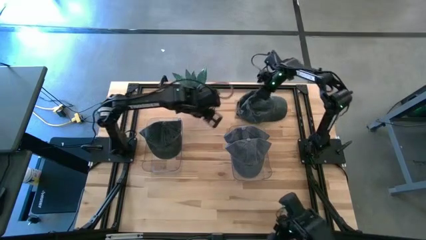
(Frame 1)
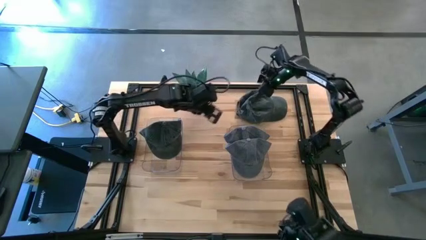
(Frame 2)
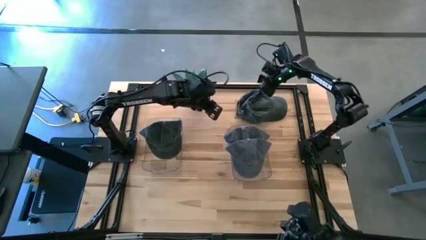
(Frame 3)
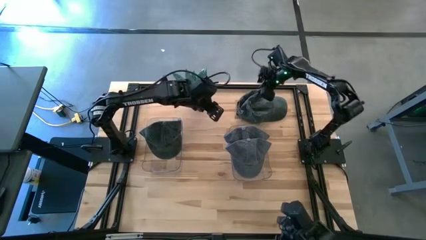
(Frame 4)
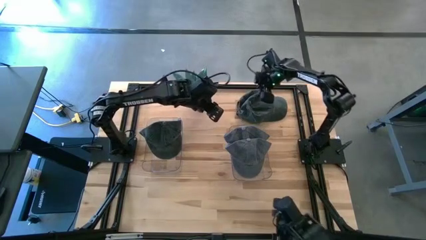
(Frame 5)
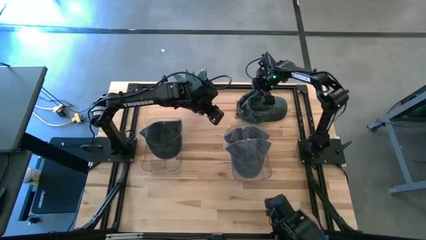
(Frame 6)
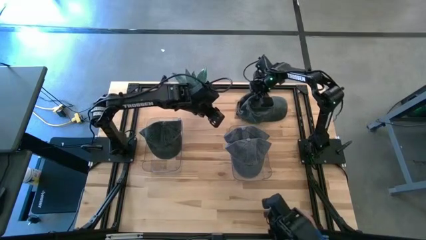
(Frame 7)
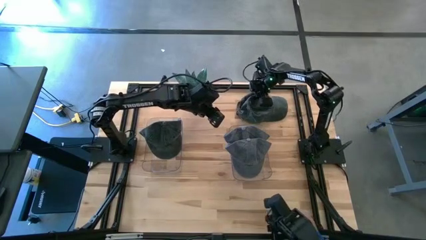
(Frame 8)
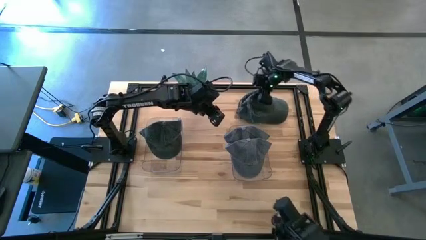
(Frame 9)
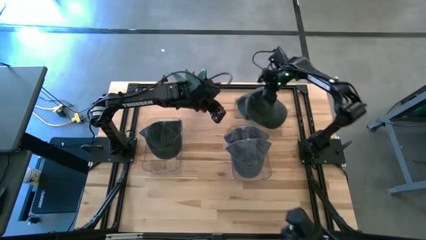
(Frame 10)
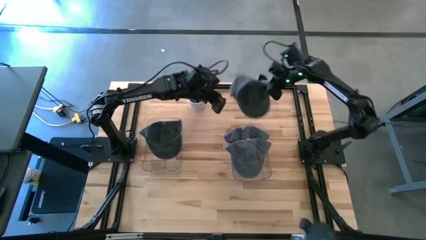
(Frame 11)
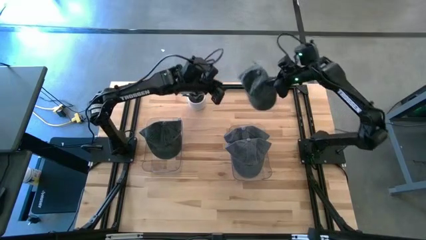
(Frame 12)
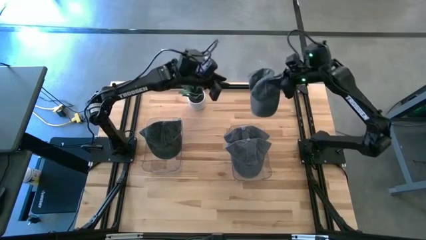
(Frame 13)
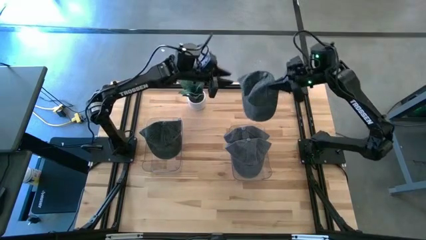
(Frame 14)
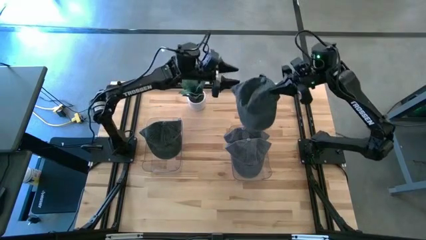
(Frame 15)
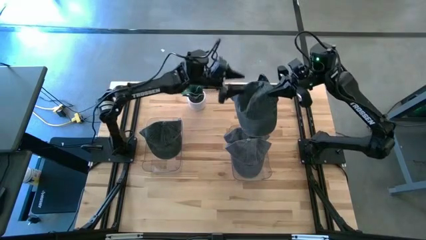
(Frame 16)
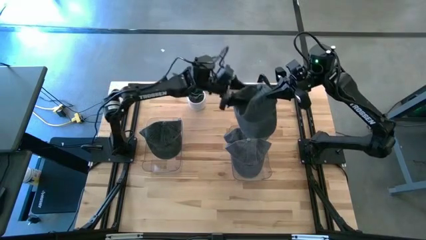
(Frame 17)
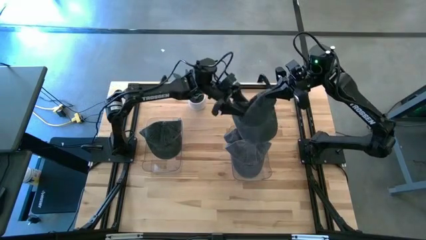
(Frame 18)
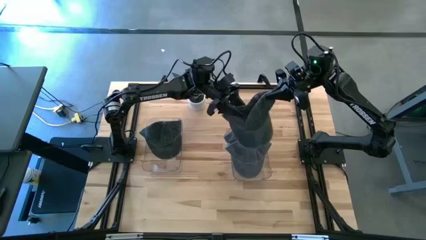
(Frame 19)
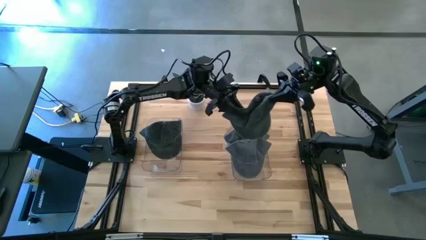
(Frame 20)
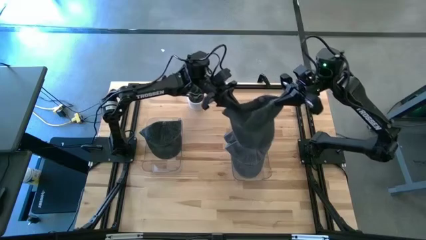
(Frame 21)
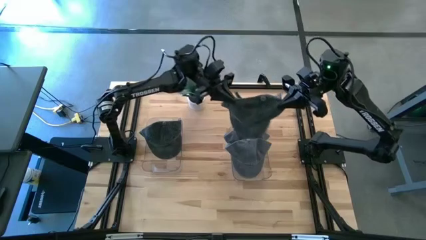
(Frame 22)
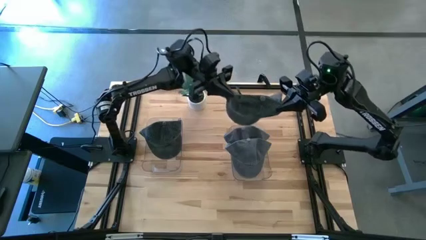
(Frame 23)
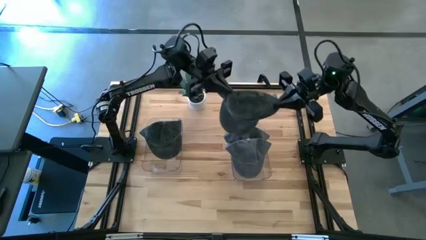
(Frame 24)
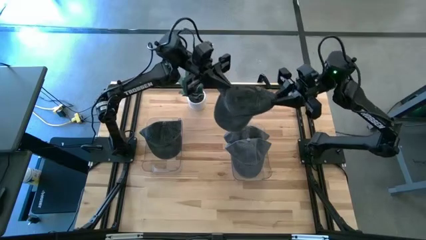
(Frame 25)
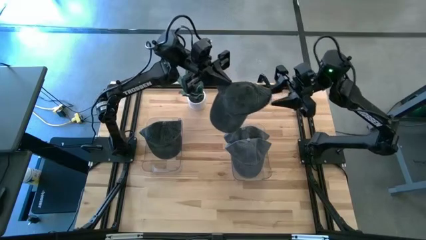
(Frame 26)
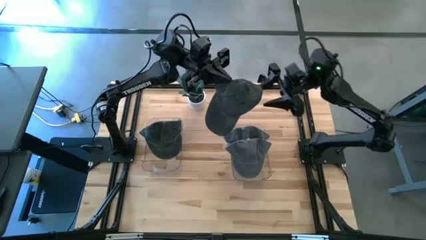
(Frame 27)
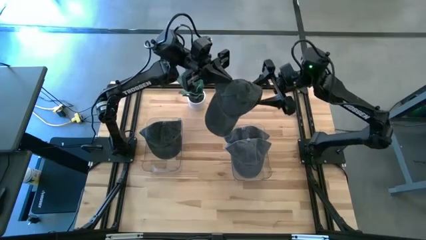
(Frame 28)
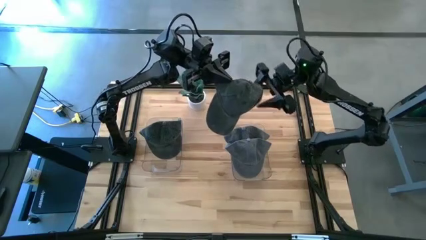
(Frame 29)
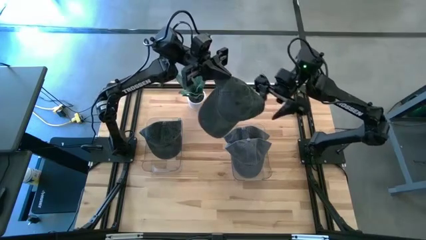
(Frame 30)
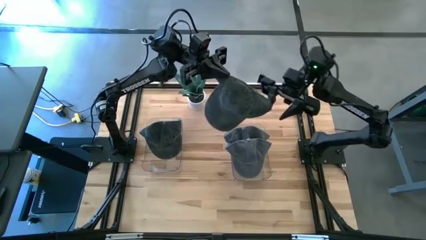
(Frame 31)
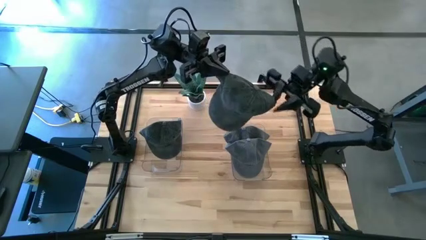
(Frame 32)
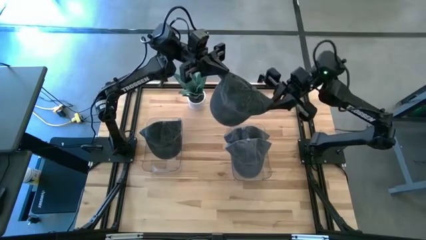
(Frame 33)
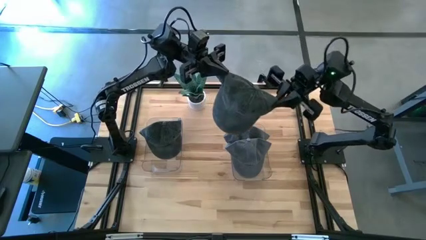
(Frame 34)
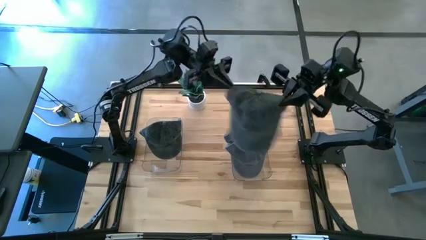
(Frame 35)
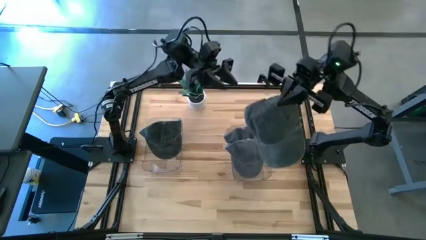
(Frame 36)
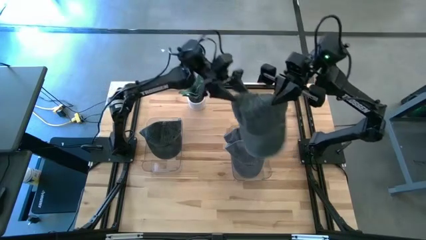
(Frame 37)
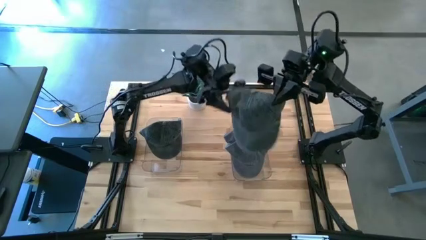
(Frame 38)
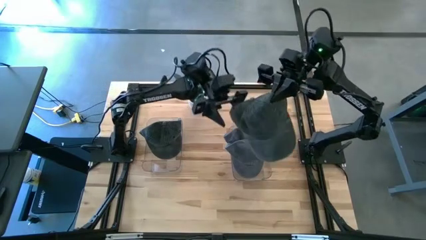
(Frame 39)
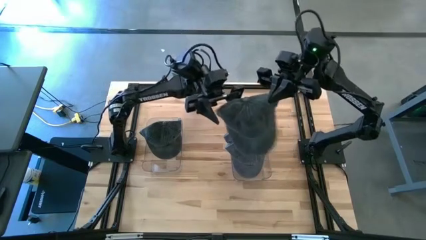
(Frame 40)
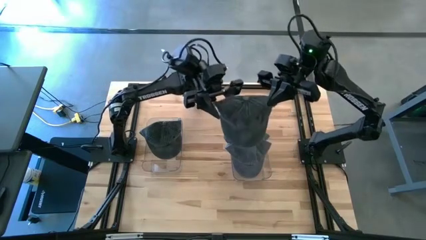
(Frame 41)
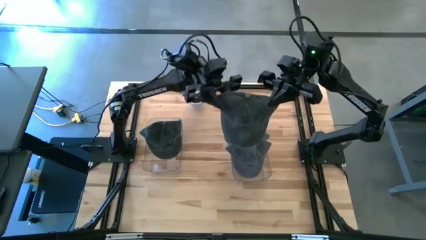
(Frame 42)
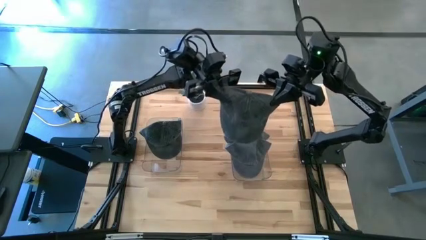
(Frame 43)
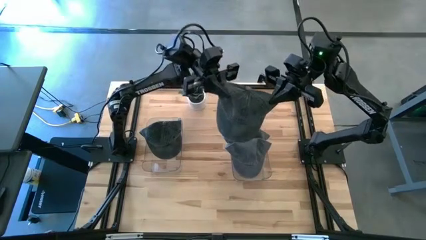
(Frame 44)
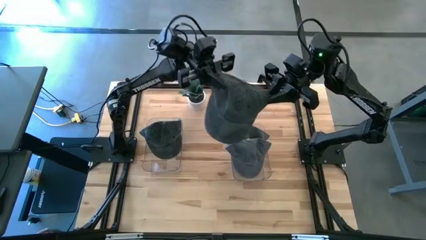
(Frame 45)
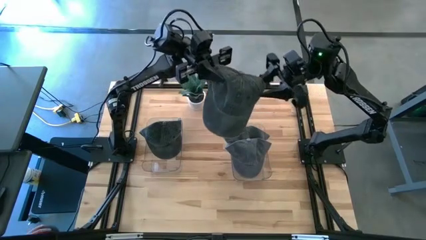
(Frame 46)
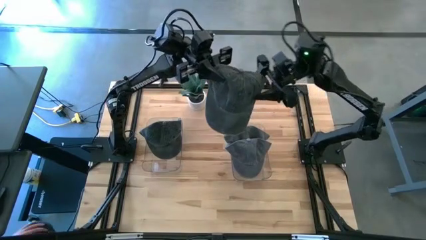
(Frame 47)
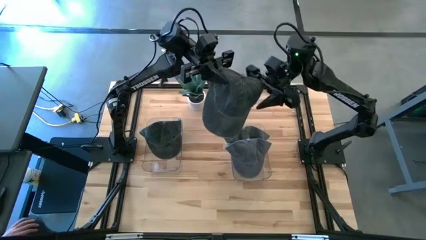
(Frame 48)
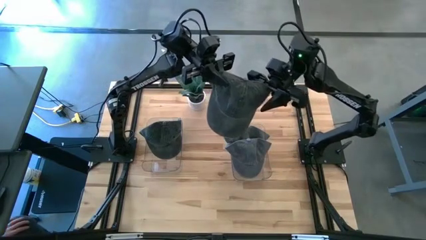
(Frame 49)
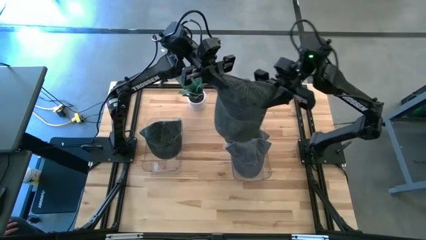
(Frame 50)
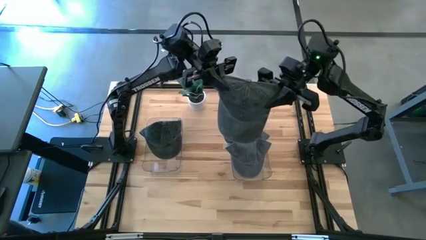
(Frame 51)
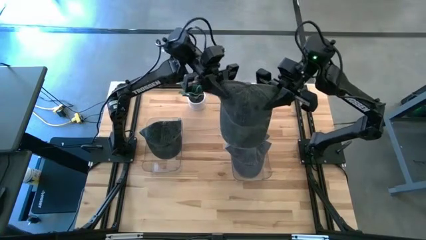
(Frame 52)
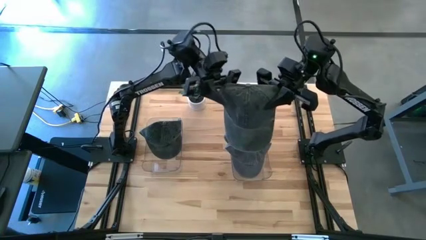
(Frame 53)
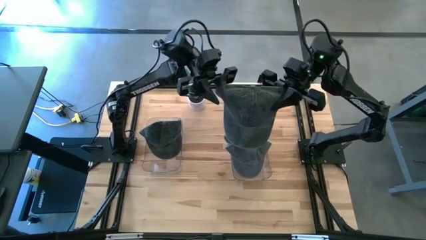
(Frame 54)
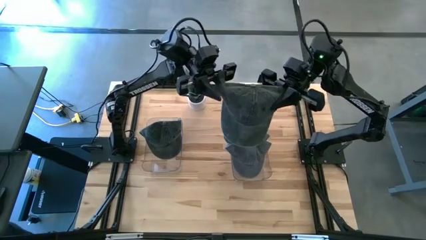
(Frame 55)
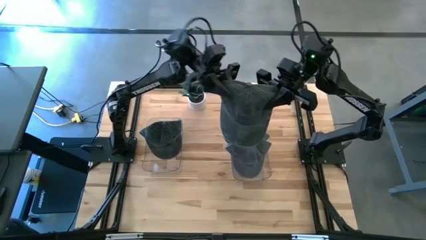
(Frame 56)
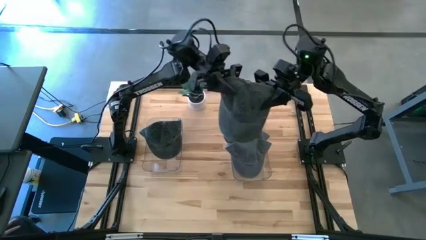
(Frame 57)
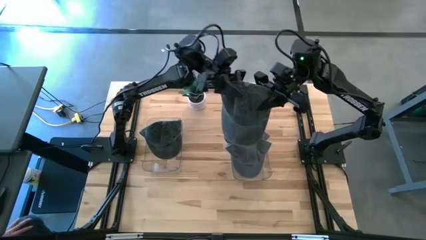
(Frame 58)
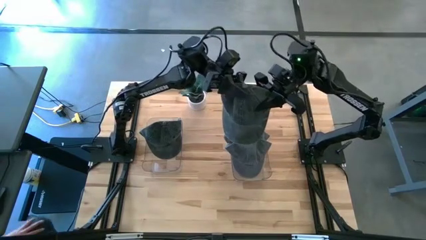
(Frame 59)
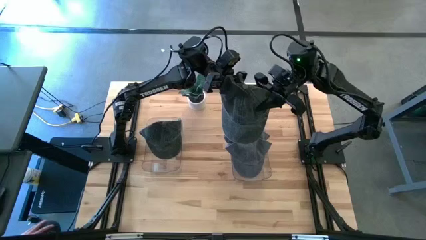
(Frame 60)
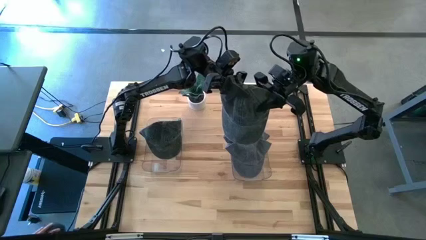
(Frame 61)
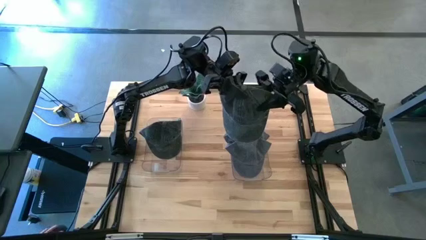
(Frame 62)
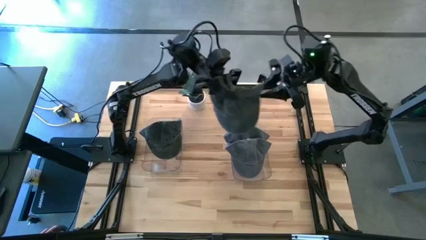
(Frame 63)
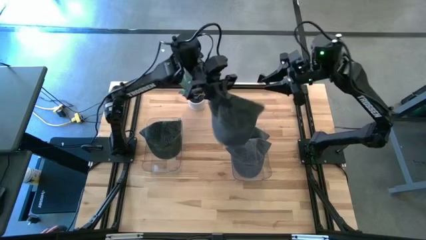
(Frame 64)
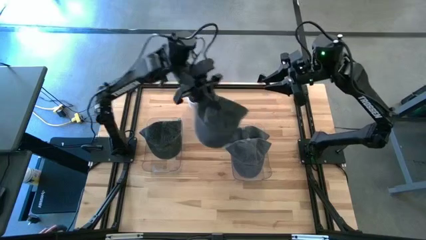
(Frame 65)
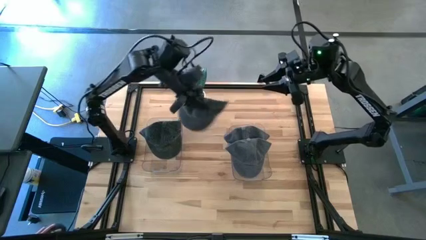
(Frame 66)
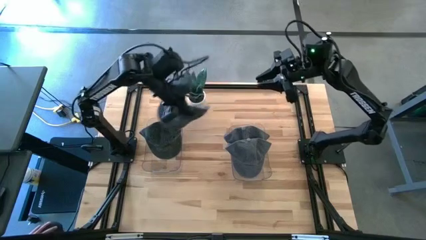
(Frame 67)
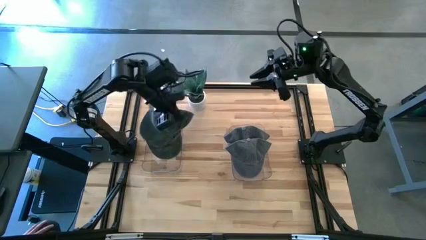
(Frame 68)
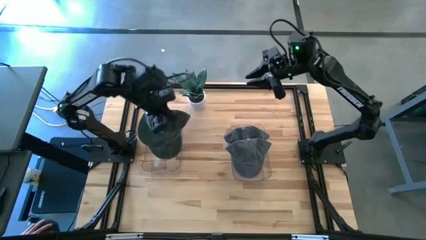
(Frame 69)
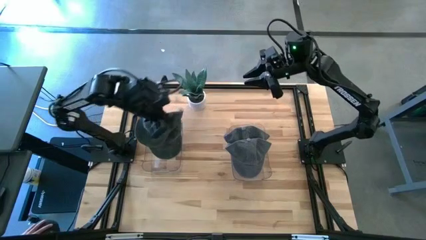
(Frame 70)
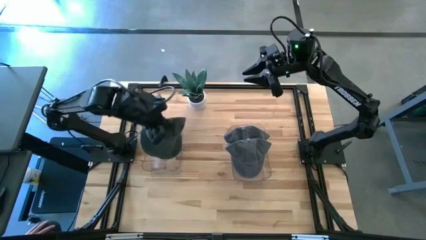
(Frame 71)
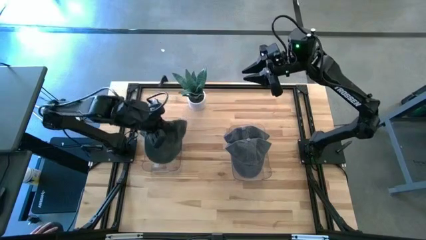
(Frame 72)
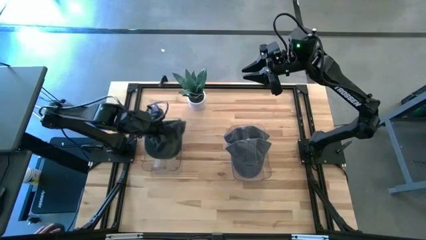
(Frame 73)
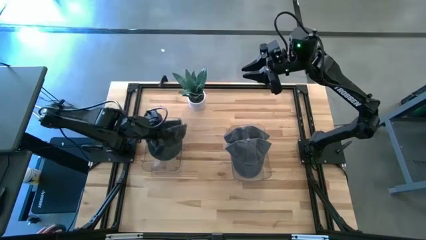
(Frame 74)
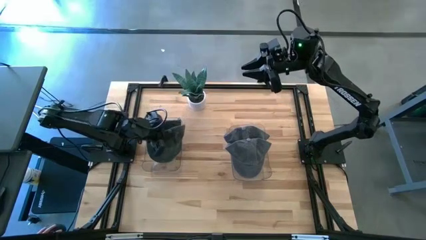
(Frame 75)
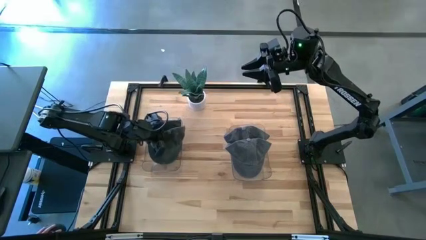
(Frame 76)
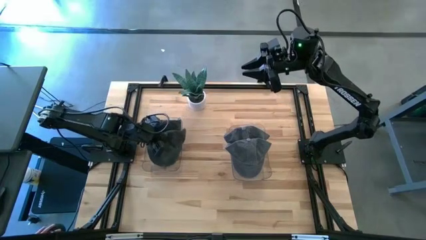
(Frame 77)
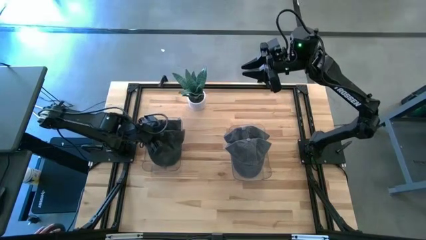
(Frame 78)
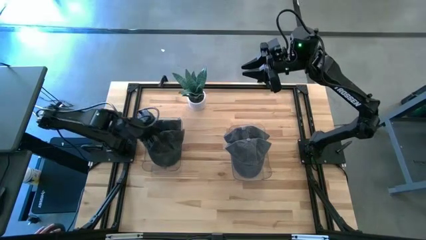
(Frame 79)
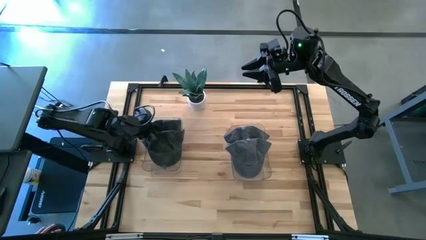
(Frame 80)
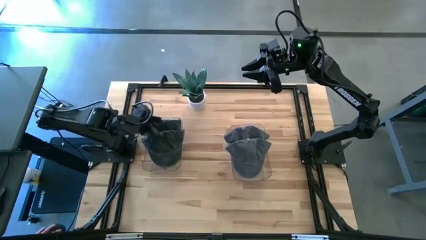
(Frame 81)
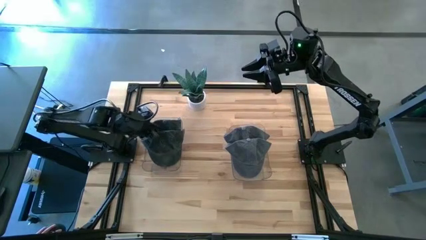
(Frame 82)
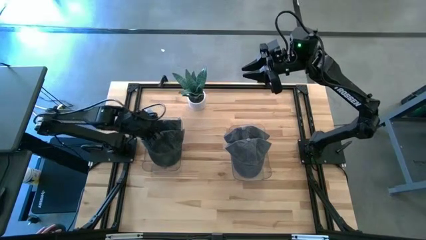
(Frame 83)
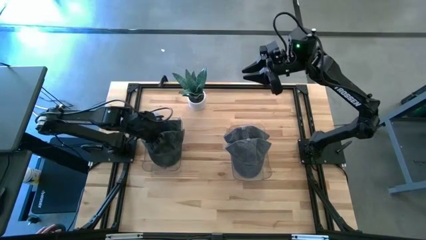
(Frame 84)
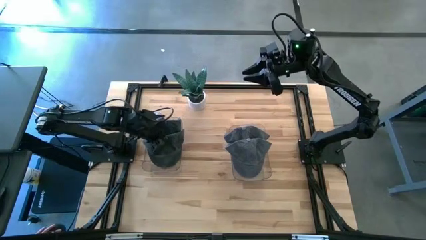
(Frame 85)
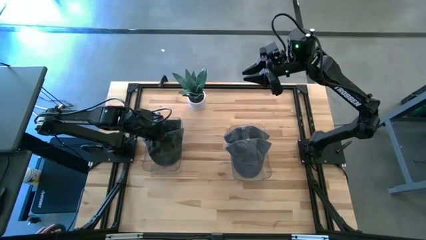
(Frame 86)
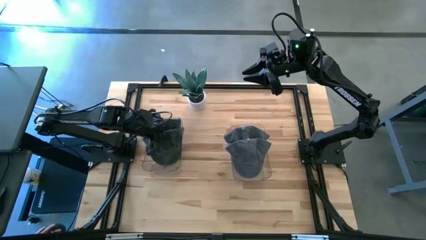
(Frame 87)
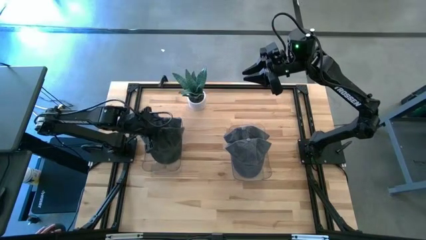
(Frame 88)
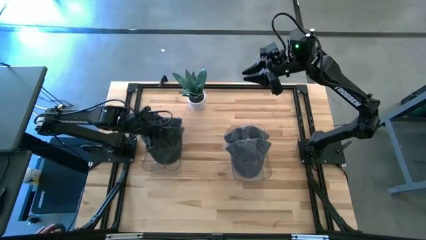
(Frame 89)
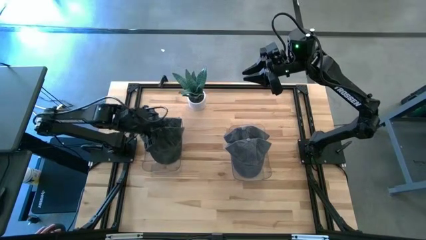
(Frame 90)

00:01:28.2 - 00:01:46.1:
Task: Pick & Place hat
Put the green cap into the left transparent bin
